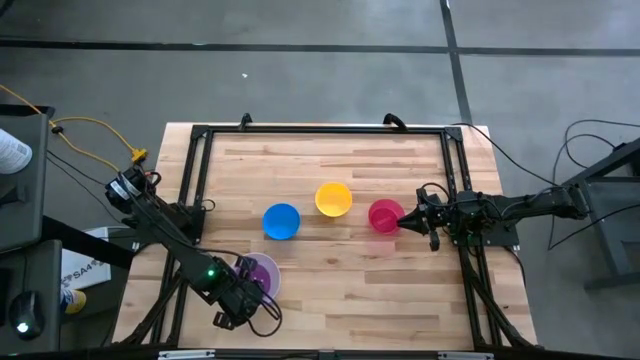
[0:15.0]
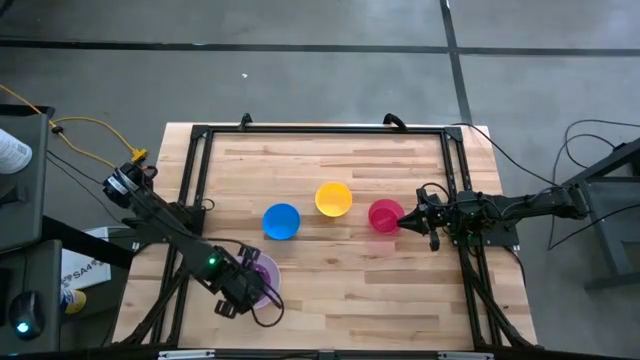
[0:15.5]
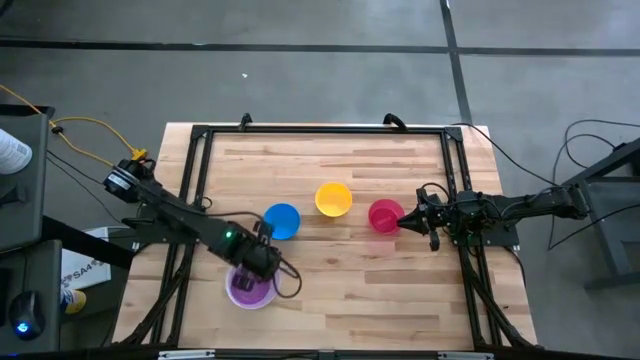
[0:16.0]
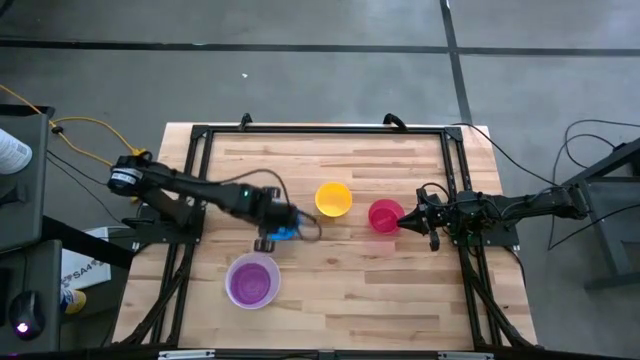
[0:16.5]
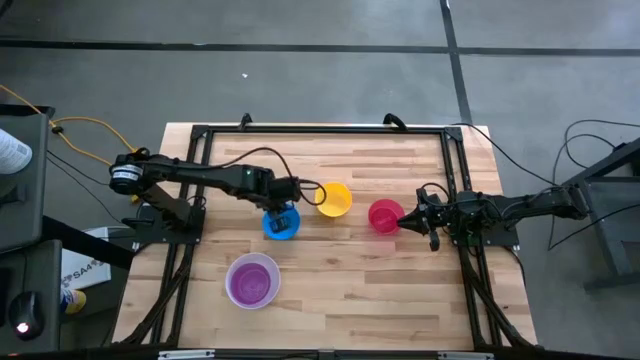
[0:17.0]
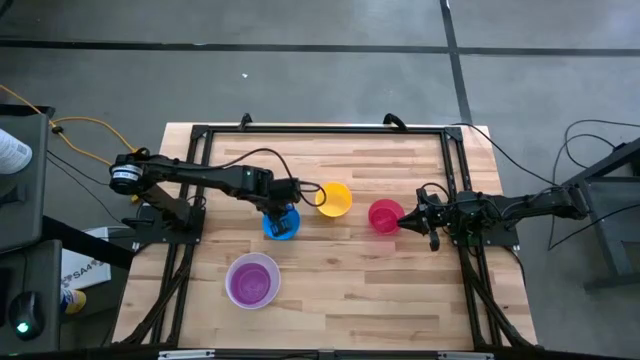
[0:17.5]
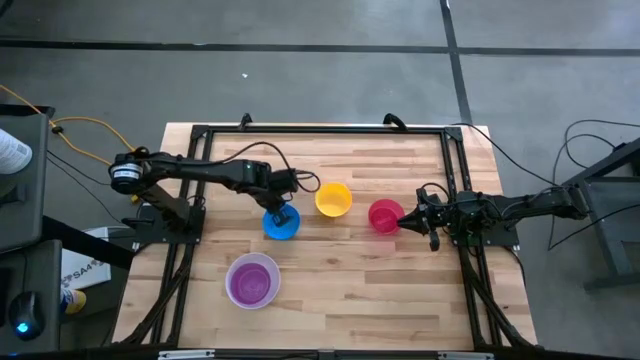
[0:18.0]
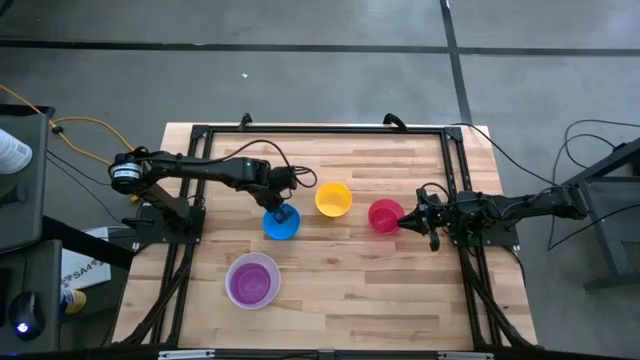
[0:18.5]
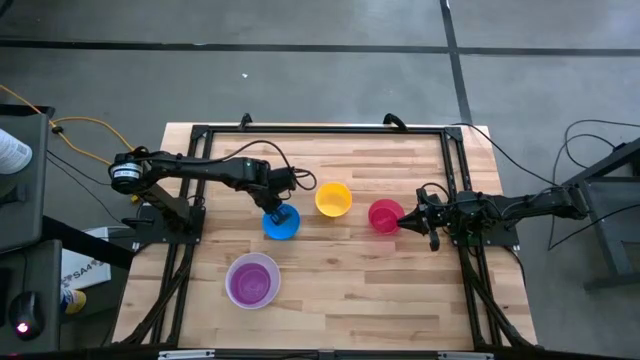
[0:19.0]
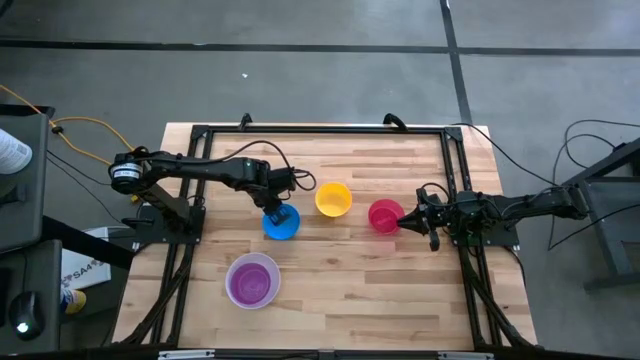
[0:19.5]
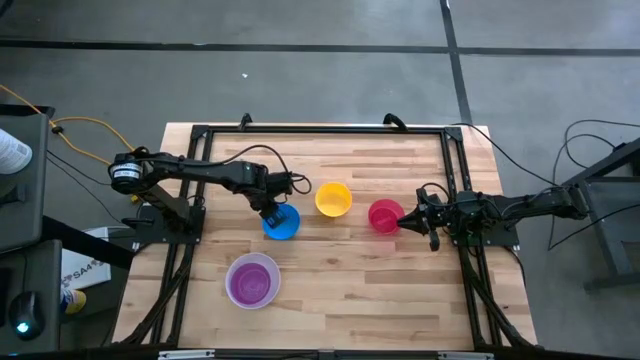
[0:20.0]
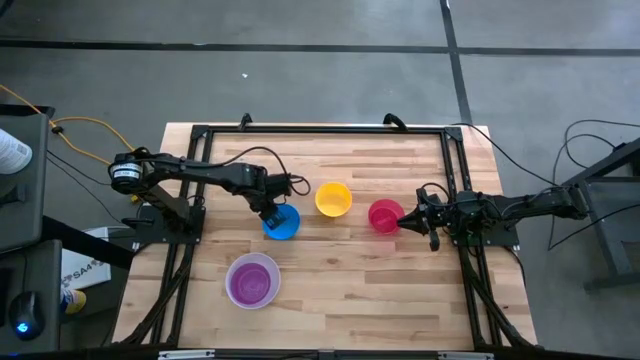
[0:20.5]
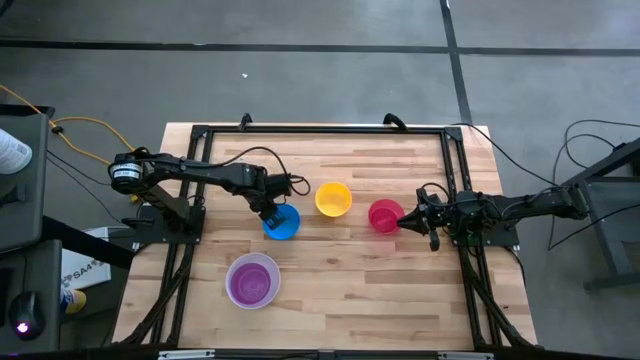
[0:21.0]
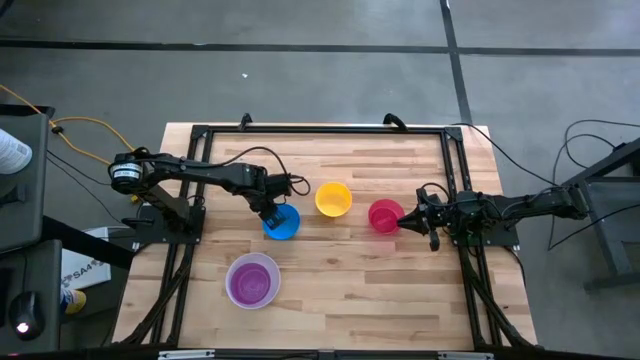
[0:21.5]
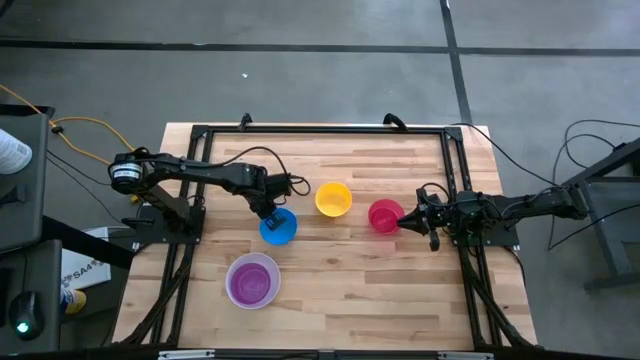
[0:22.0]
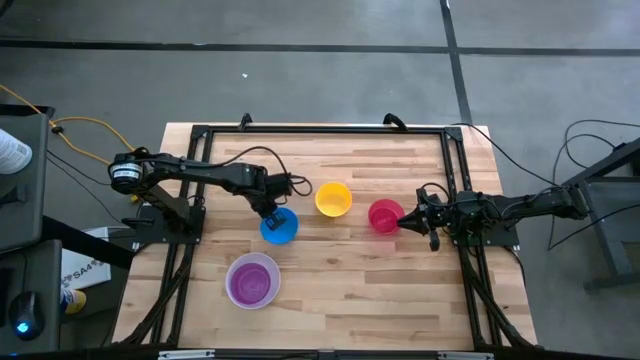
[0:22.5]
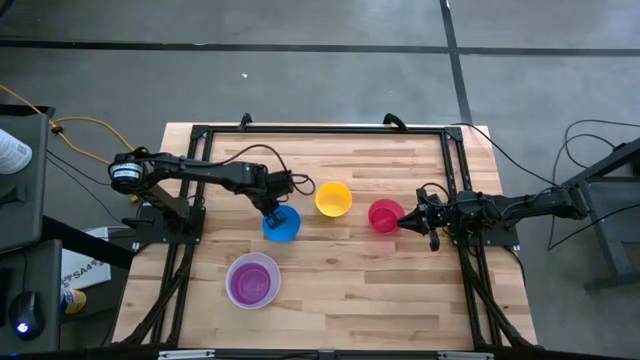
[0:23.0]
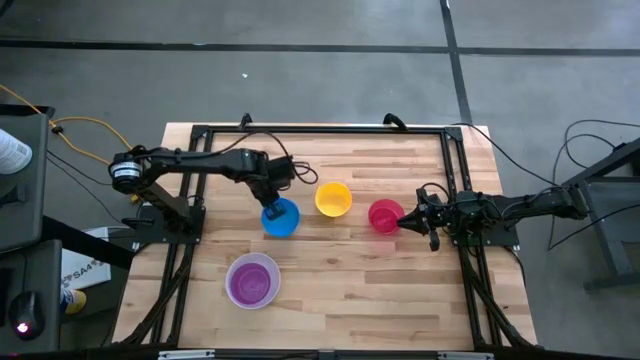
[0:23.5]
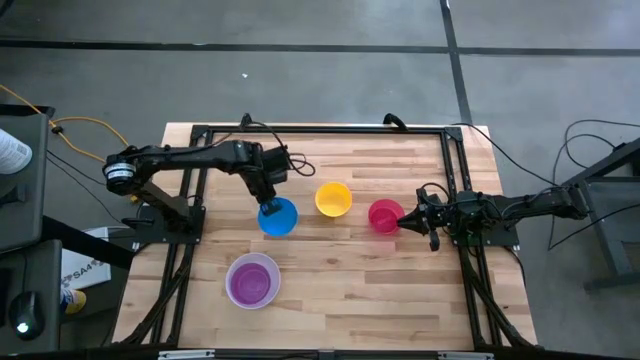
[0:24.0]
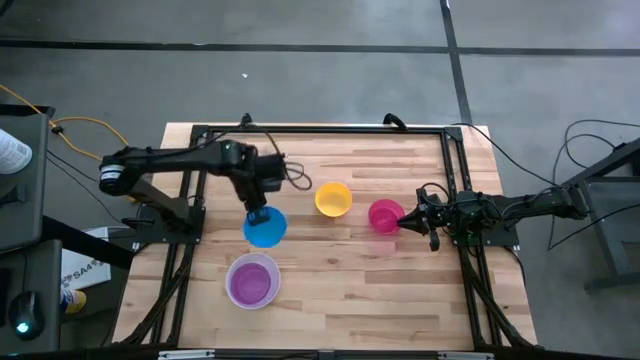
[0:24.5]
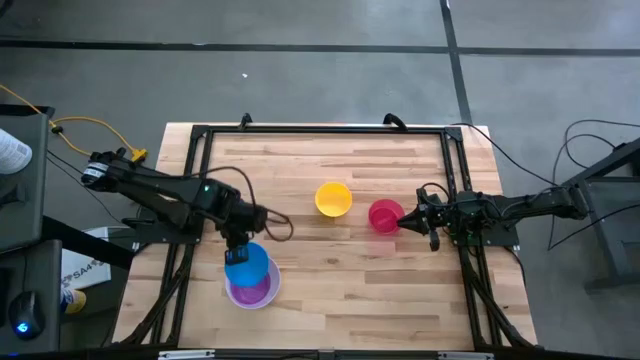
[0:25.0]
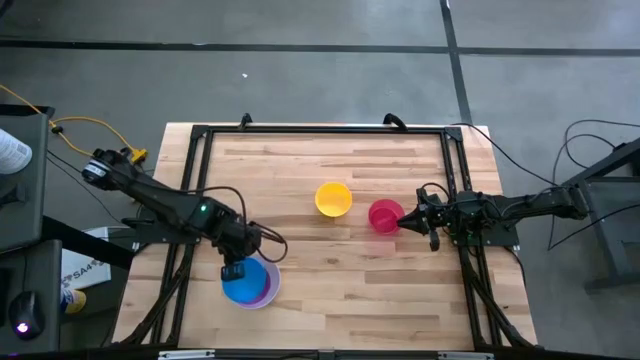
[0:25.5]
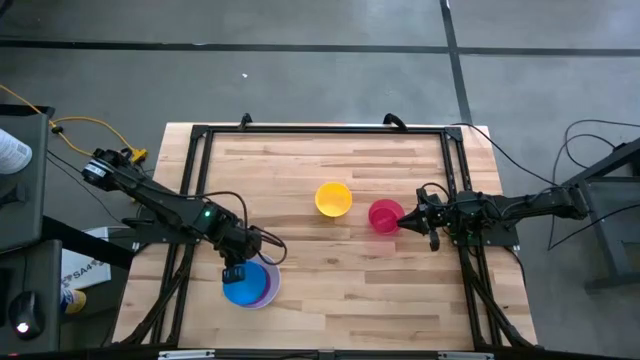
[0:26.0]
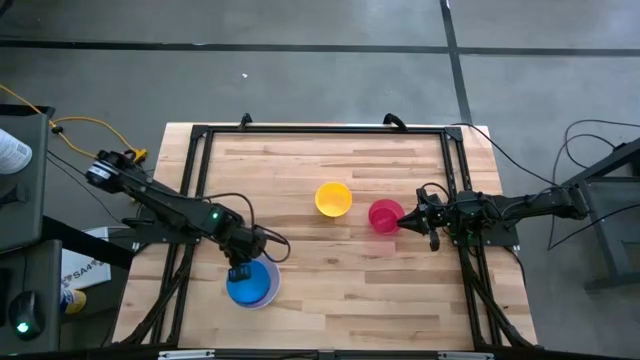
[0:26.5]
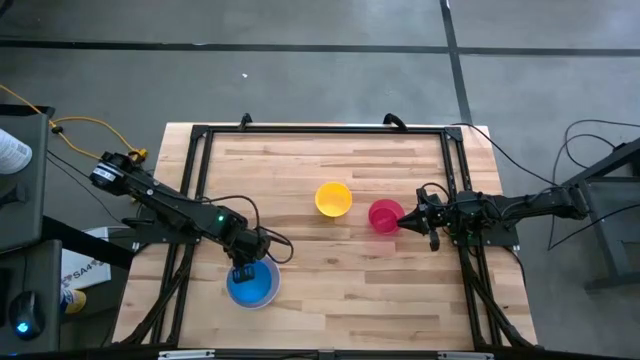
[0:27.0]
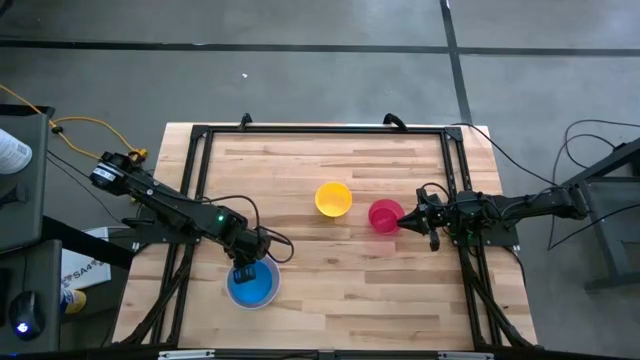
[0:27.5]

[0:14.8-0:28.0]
Stack the blue bowl on the purple bowl
